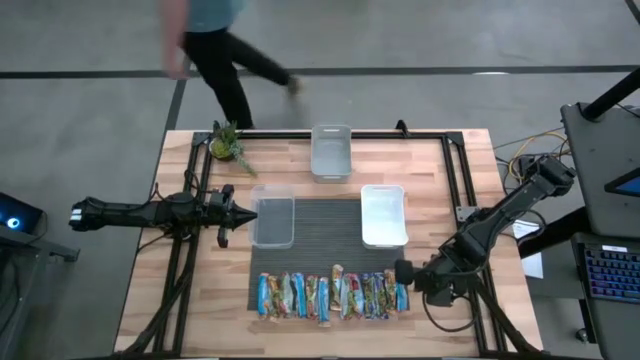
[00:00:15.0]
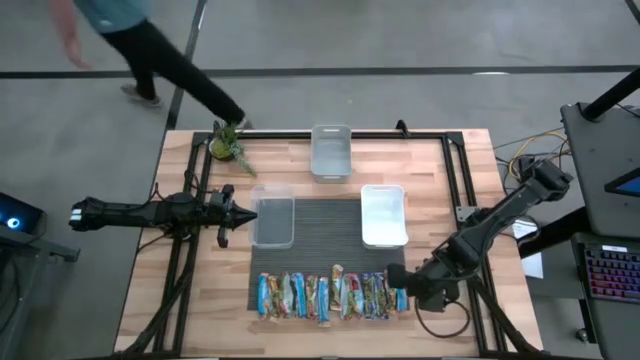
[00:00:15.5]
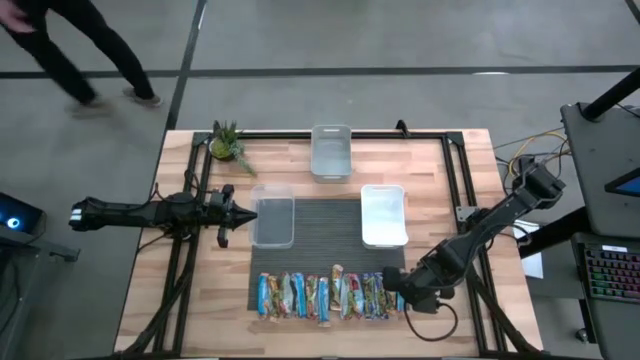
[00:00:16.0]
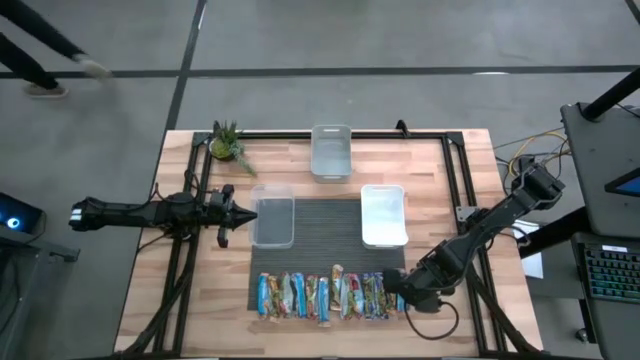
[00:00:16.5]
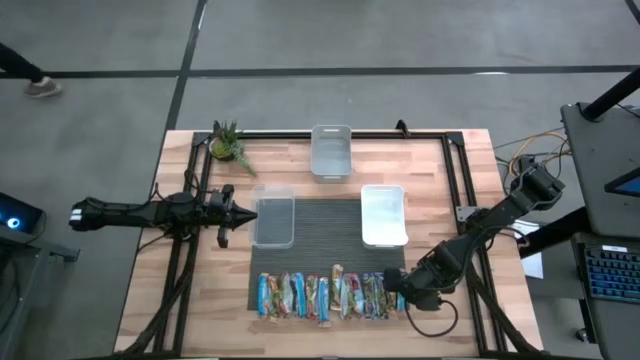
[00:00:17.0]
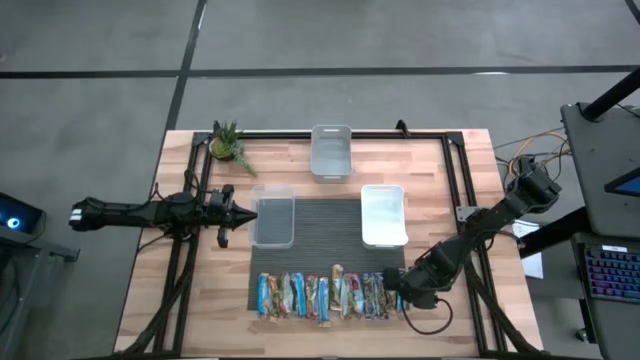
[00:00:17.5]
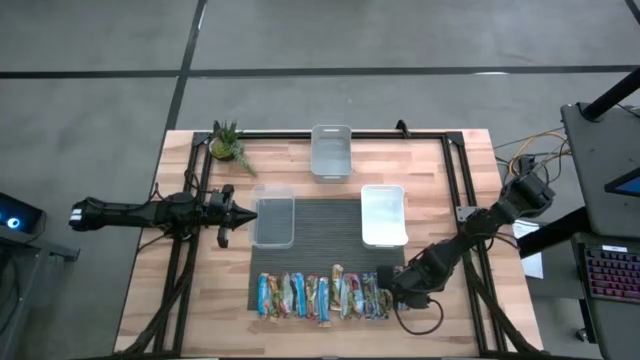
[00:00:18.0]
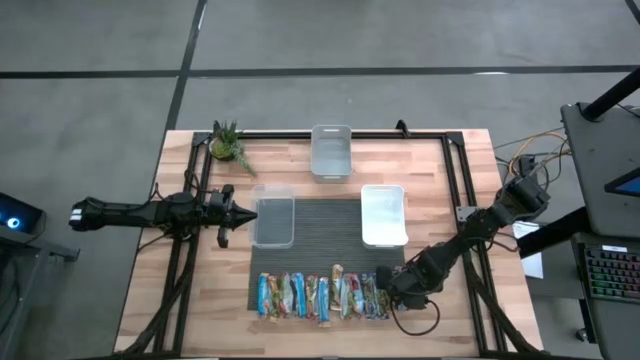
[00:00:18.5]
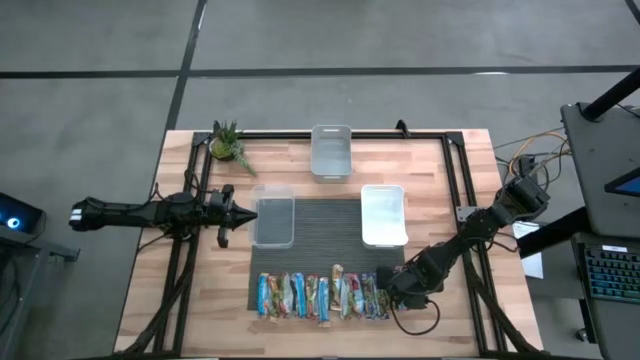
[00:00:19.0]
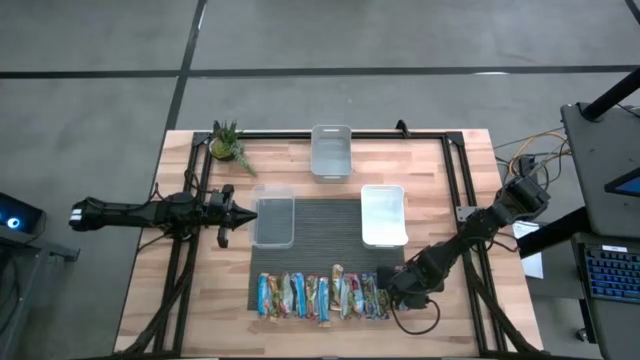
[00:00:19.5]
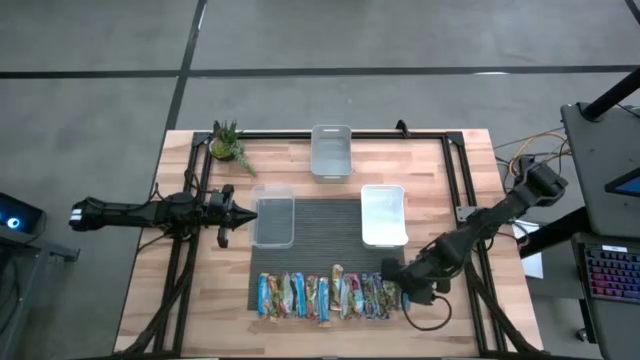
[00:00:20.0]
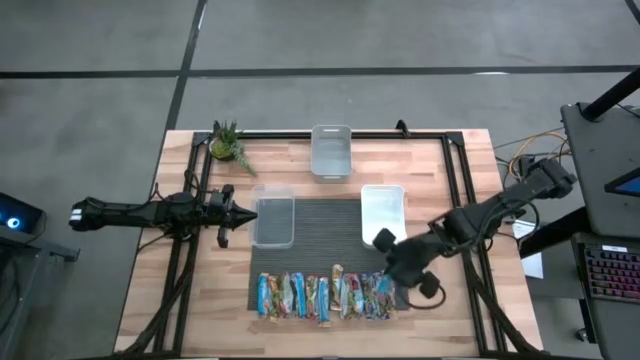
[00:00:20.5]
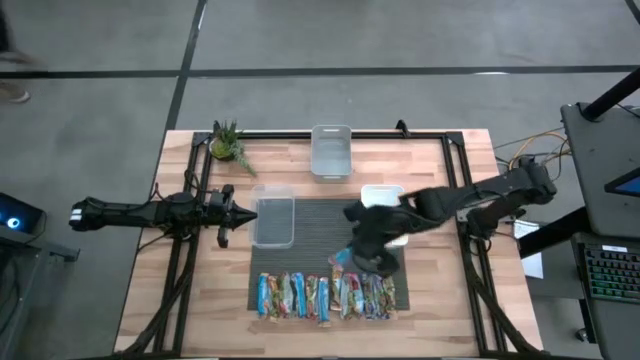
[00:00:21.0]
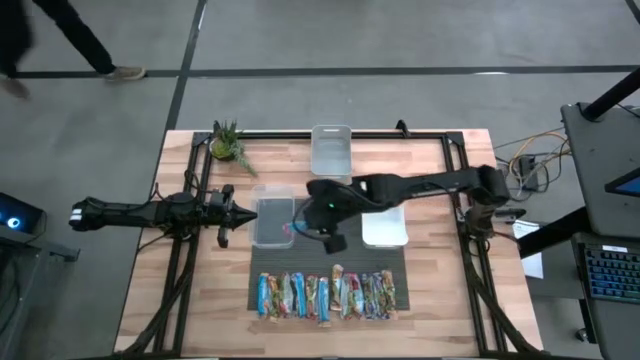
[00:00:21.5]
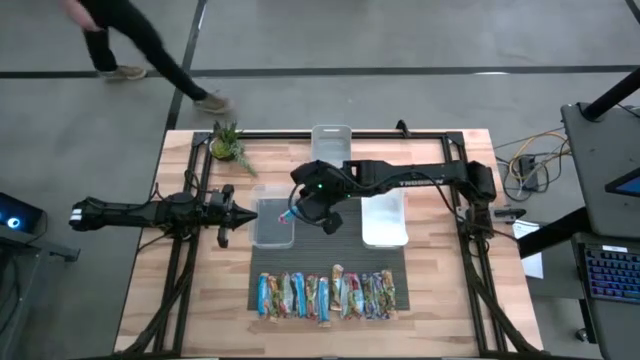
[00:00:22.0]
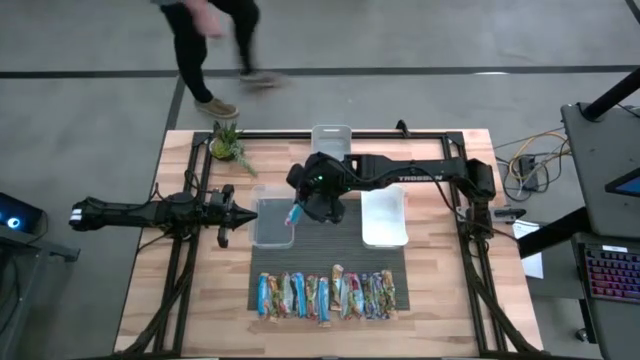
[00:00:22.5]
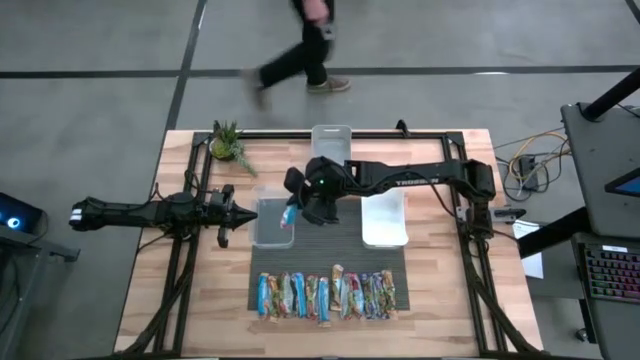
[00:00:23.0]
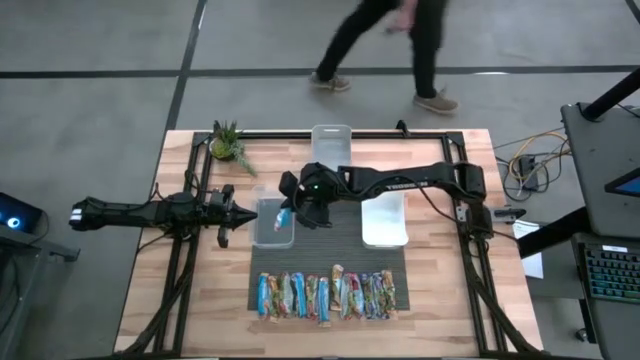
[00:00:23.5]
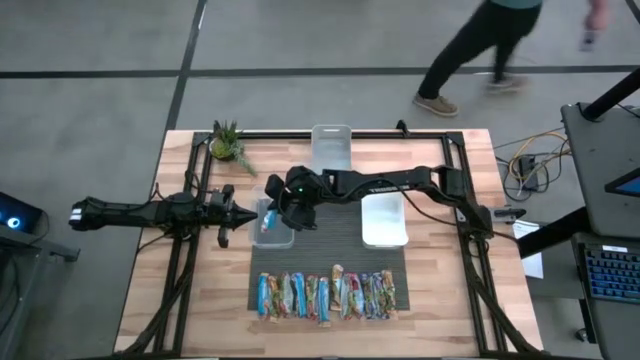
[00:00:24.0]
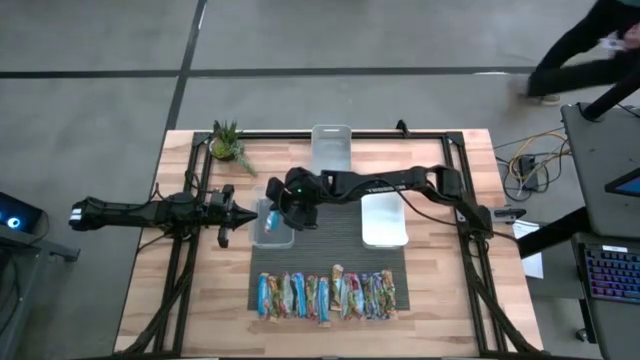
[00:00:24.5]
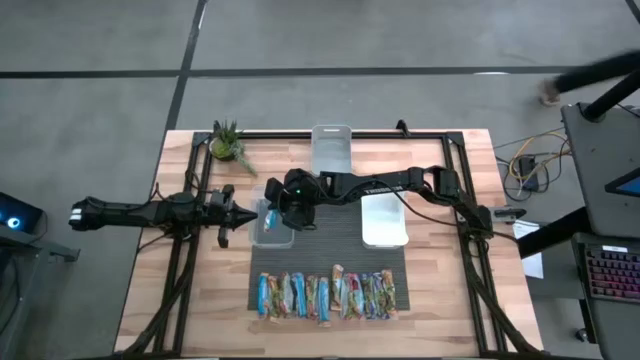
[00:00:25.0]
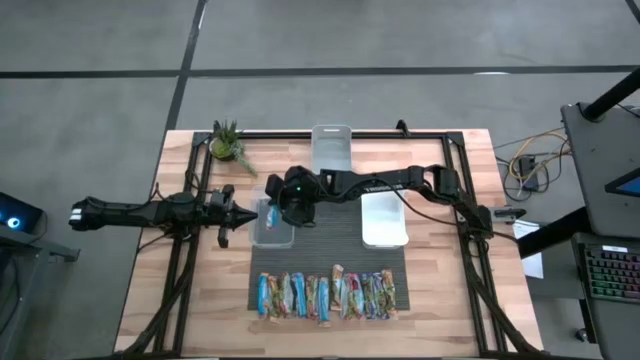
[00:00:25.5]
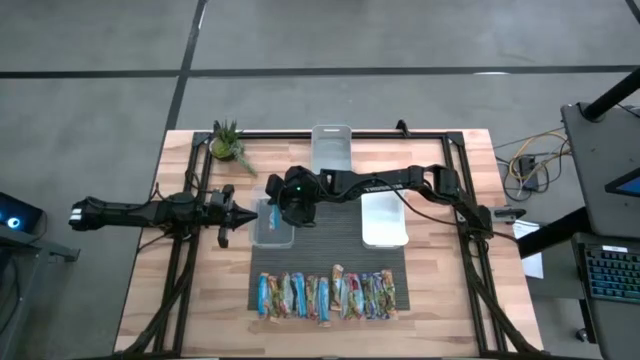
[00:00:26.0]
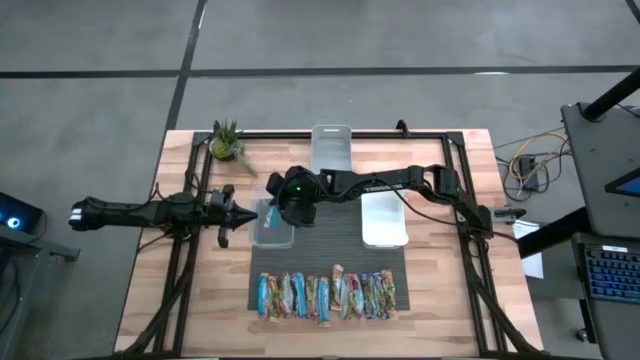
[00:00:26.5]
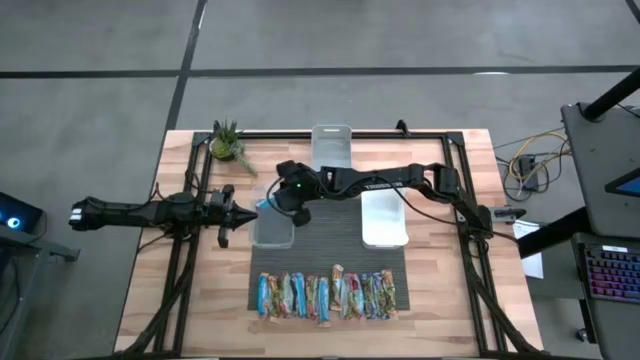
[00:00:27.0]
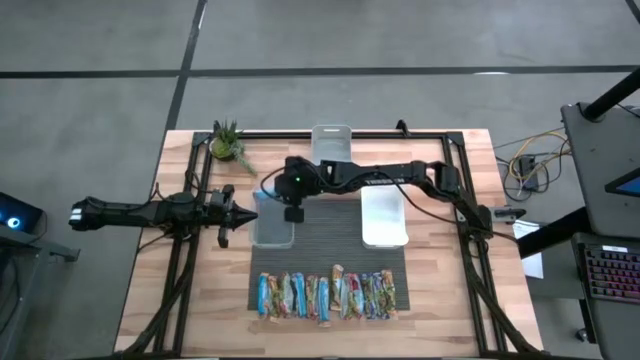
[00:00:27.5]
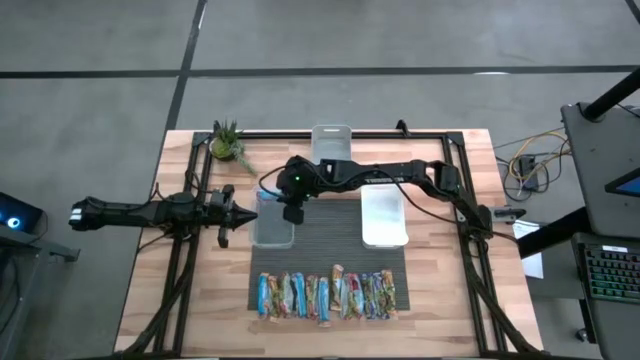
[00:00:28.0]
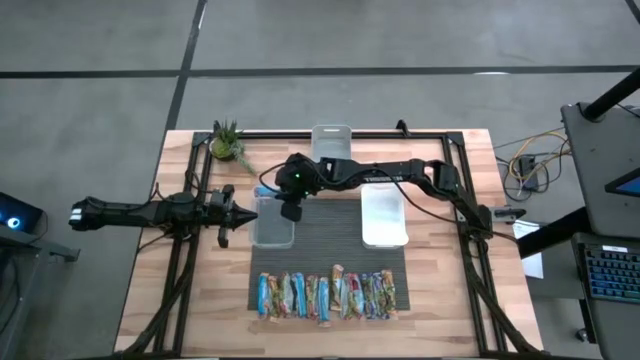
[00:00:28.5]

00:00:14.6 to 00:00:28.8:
Task: Pick and place Granola Bars by type
Put the red granola bar into the transparent bin

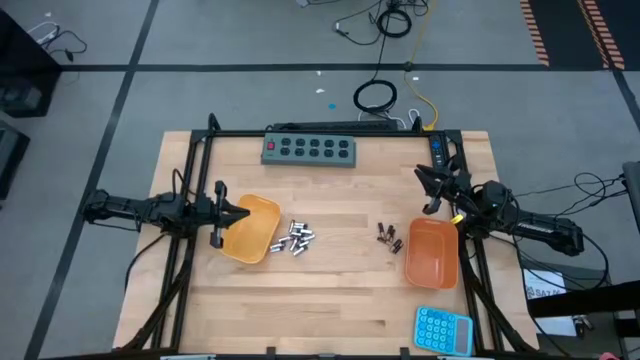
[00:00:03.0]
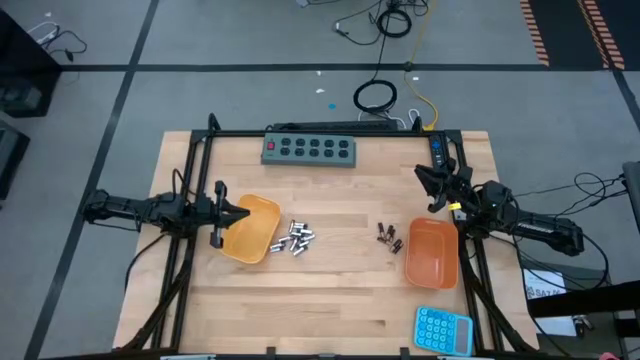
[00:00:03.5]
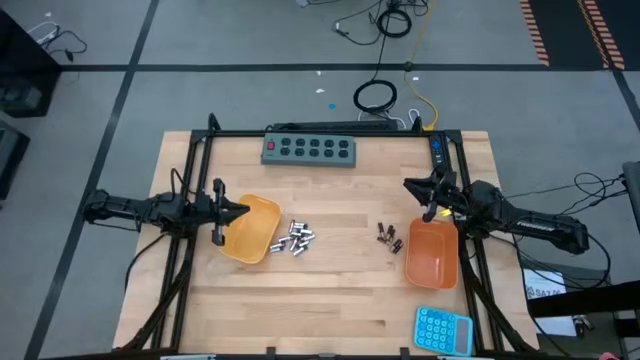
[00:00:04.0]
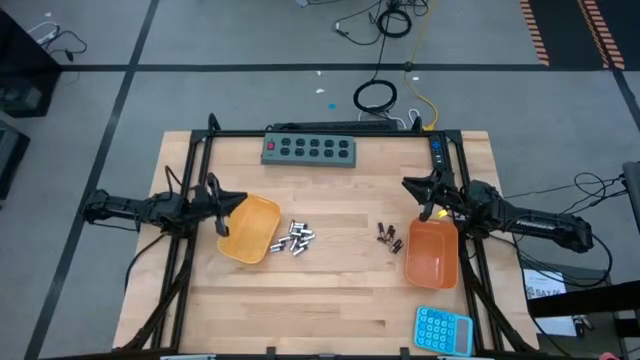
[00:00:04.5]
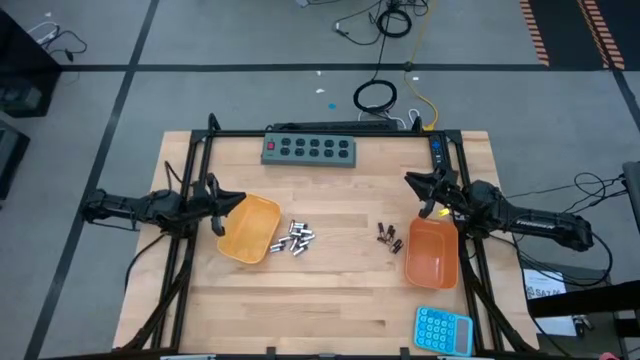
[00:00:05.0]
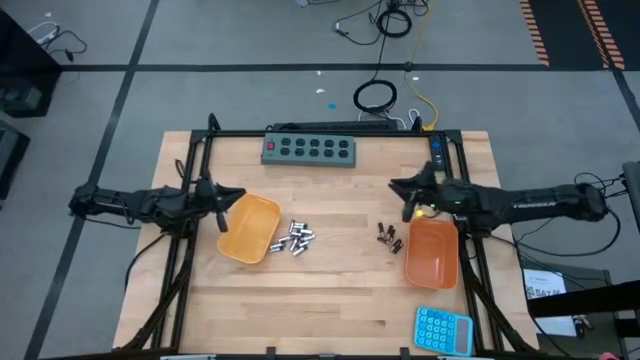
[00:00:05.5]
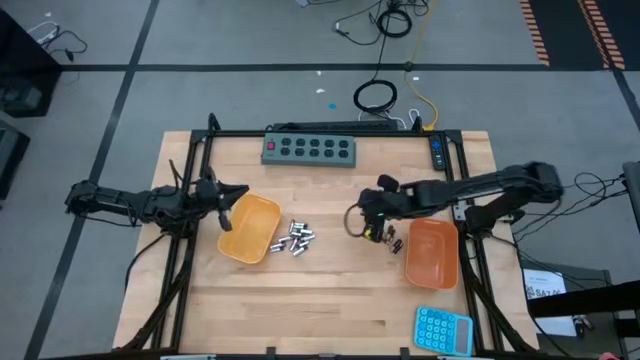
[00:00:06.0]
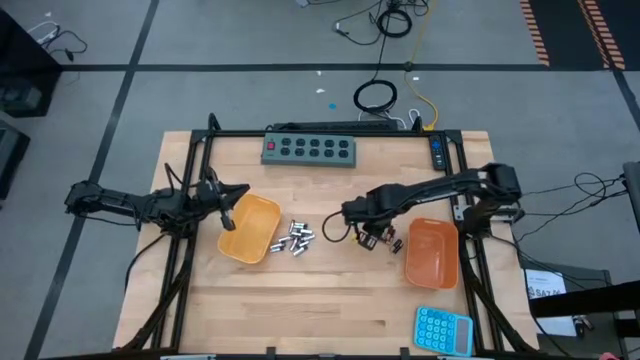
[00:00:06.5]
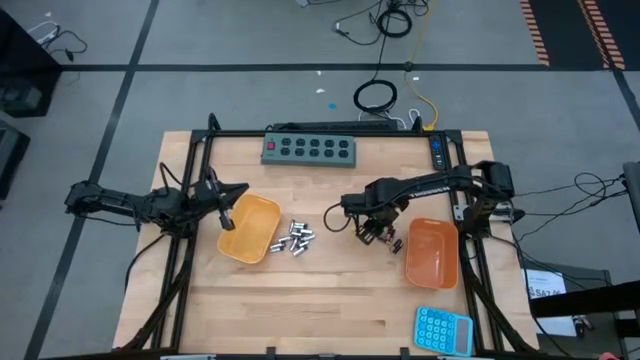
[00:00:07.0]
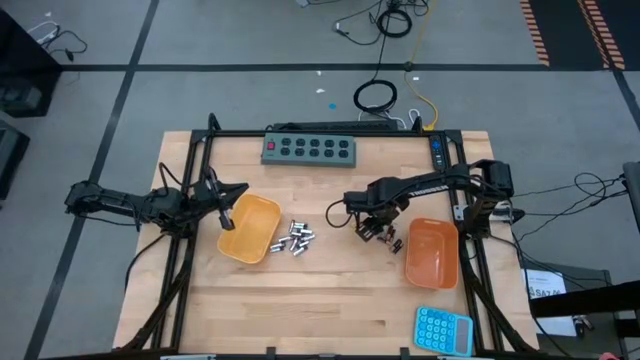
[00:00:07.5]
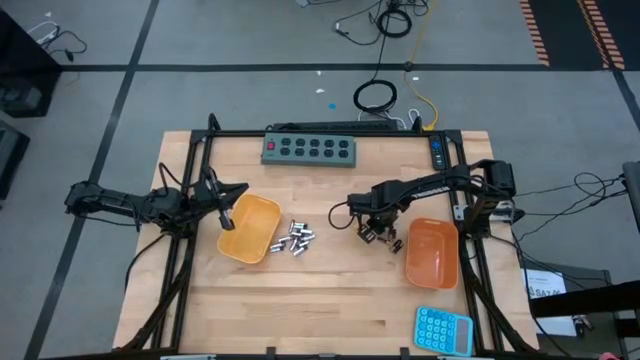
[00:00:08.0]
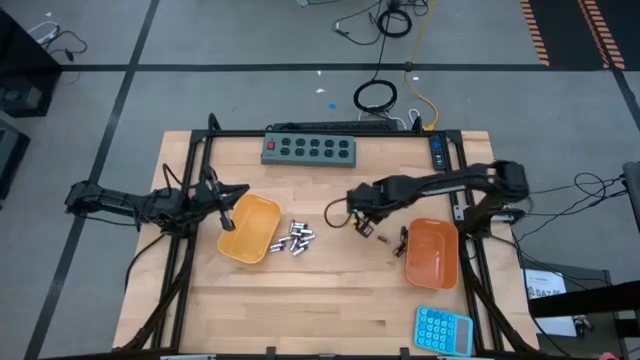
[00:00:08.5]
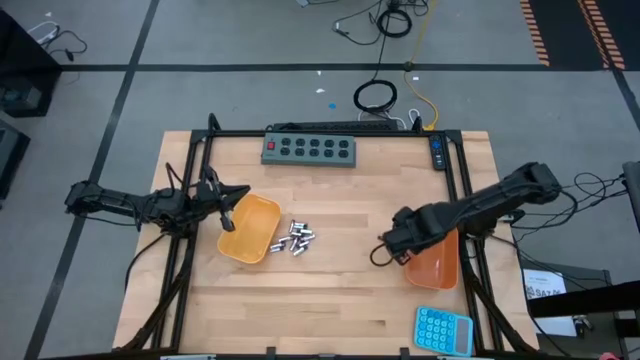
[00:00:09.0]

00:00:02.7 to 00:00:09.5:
Task: Sort batteries
Put the black battery into the orange bin
